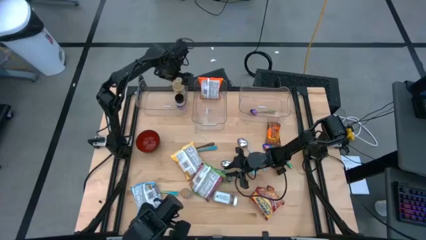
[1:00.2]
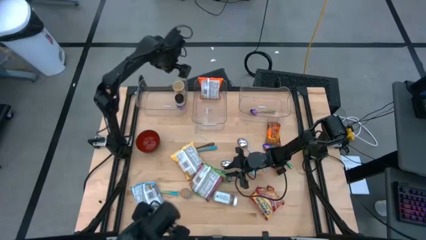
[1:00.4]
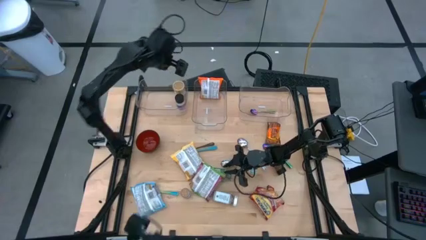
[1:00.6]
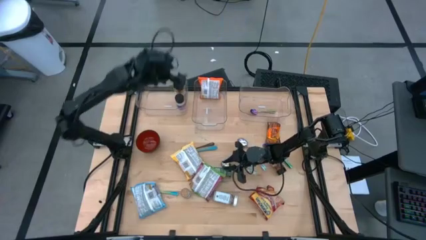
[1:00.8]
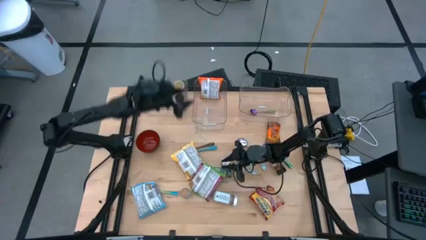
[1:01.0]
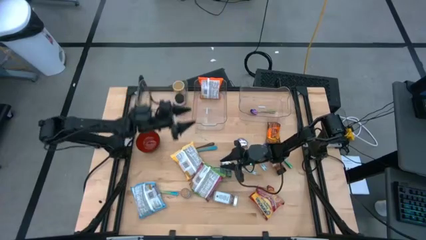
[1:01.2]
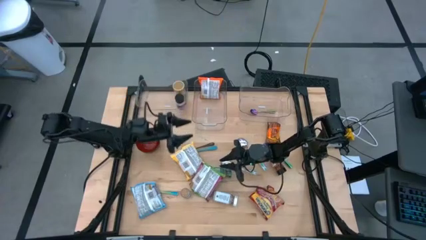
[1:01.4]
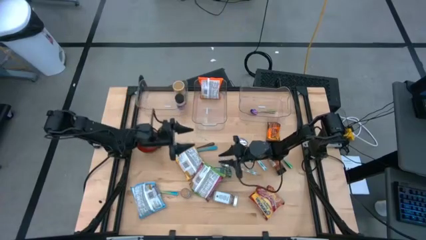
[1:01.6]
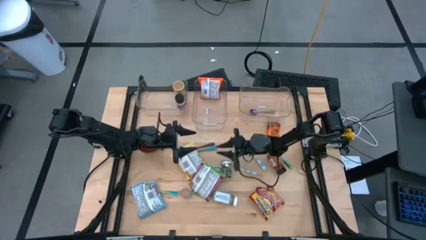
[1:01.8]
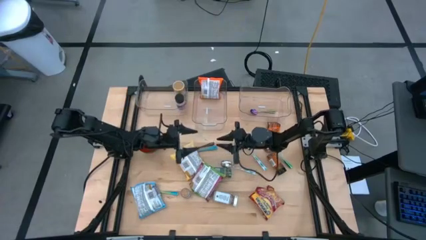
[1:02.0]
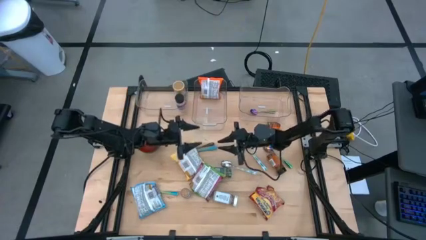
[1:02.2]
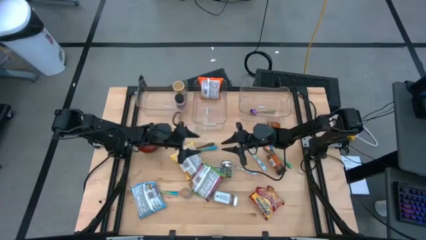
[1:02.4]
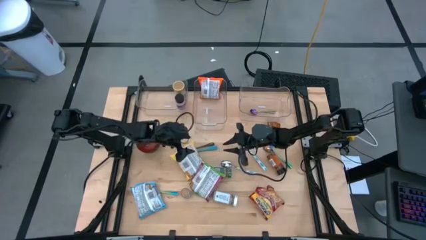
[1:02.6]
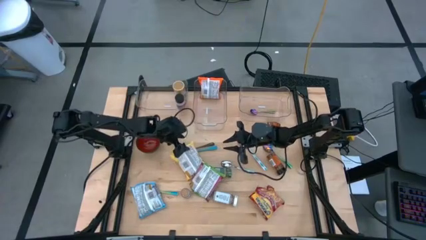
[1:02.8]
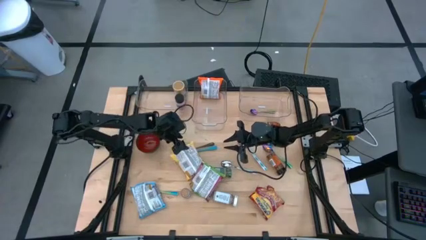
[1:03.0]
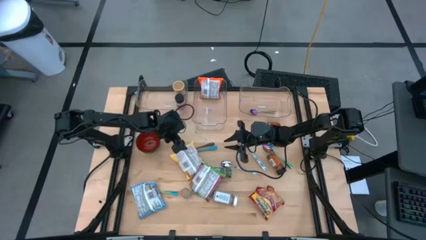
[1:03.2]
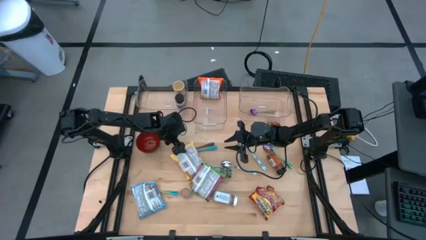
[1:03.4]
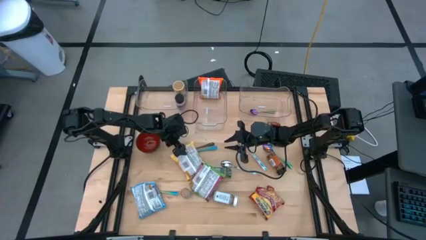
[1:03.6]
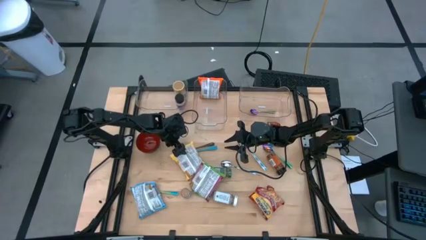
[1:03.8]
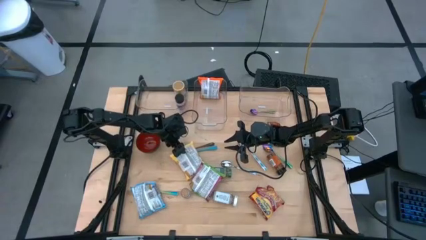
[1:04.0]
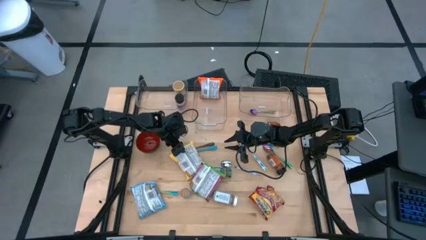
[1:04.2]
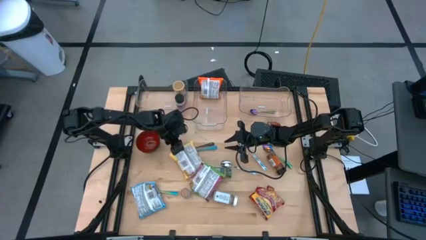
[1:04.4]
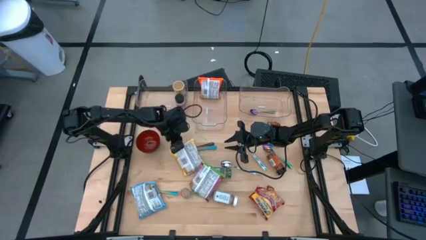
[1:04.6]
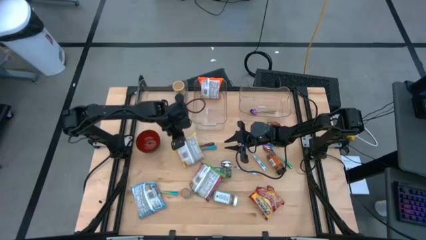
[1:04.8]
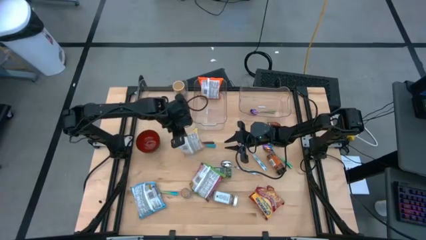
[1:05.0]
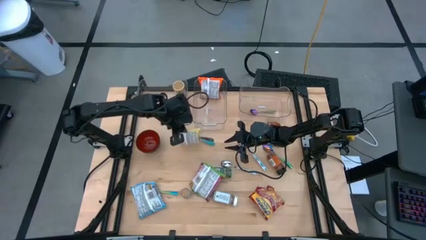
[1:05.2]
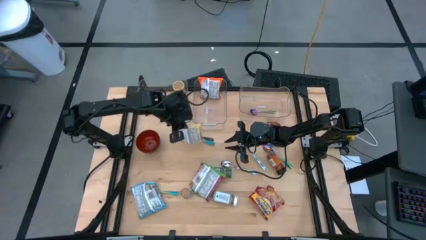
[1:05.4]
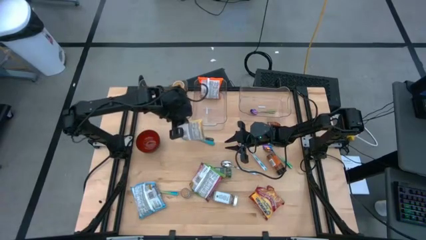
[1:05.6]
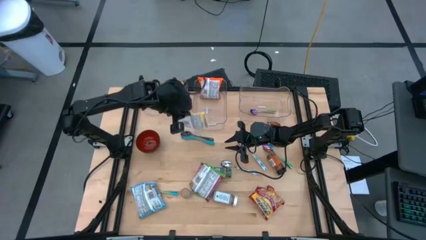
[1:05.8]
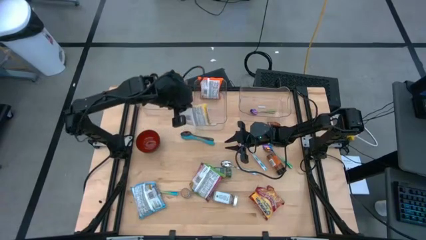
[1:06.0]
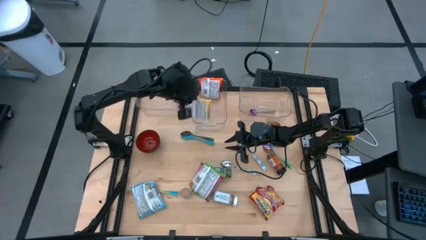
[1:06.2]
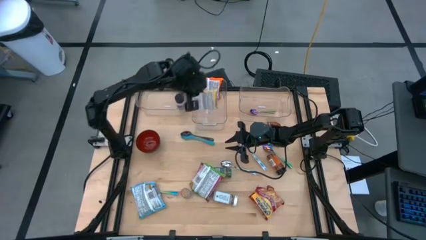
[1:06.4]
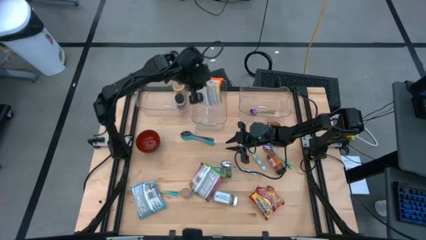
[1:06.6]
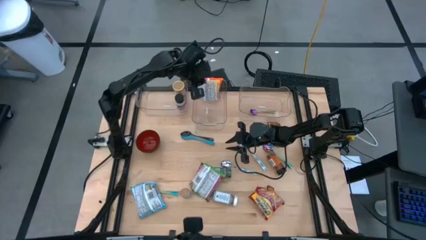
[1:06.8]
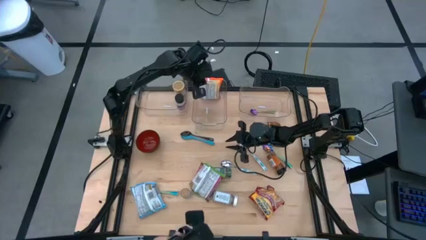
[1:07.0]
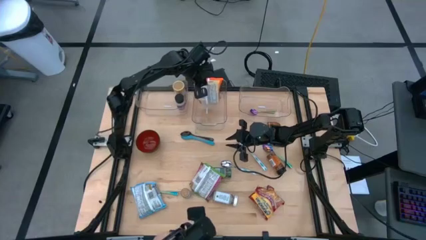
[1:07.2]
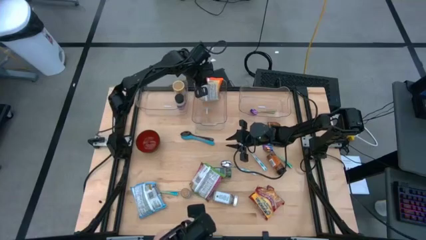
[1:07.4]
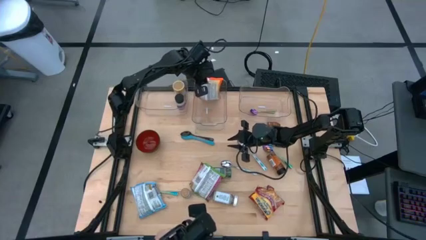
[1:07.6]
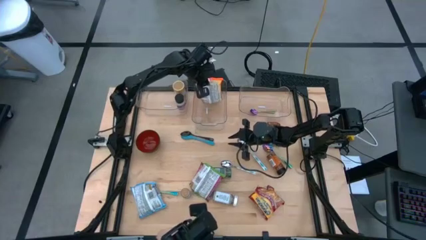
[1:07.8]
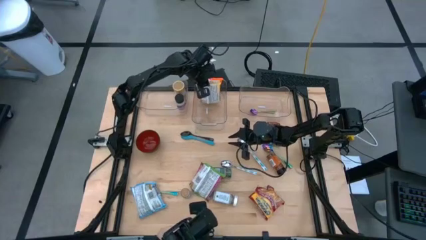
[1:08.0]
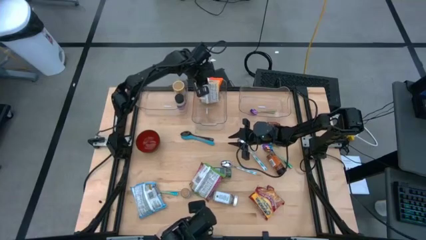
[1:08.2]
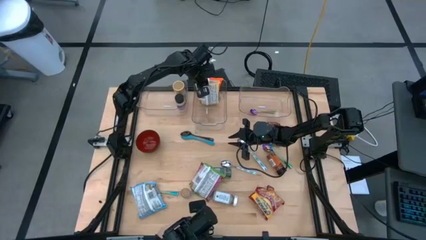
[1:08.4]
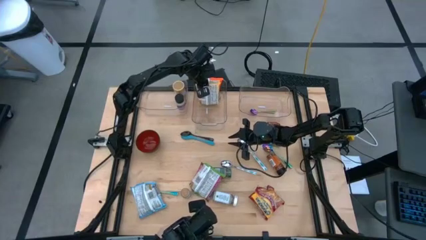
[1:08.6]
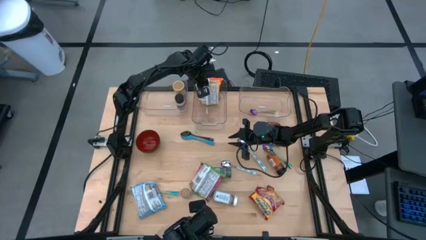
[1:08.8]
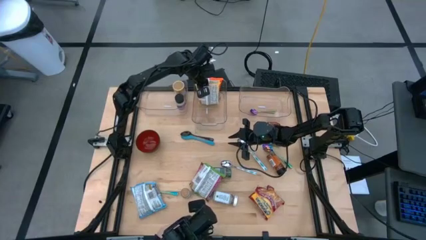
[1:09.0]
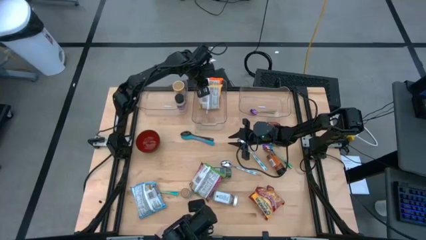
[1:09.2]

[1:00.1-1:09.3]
Task: Pick & Place Food Item
Put the yellow noodle pack into the middle transparent bin

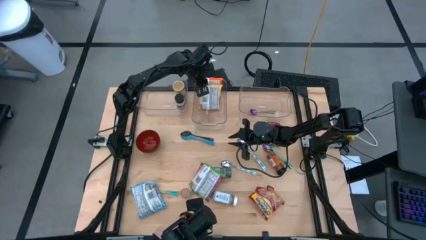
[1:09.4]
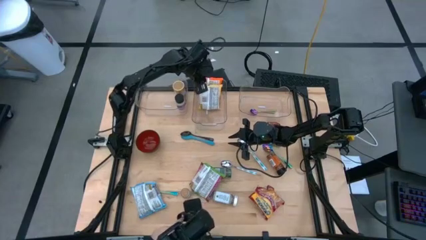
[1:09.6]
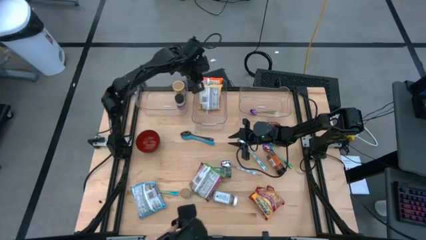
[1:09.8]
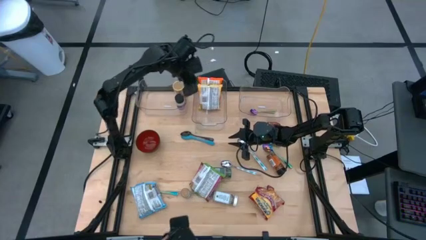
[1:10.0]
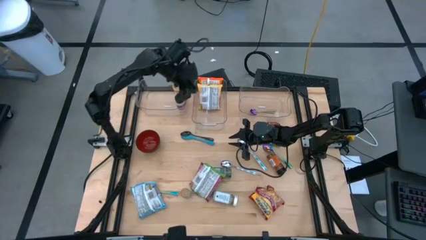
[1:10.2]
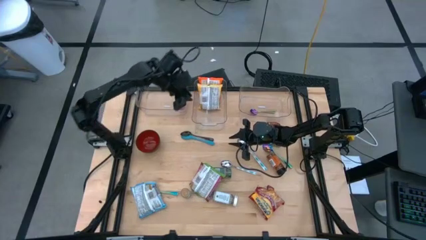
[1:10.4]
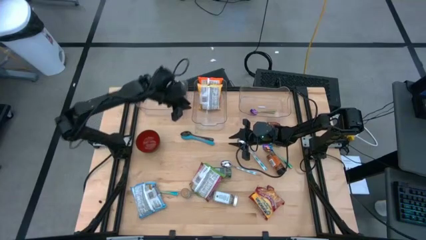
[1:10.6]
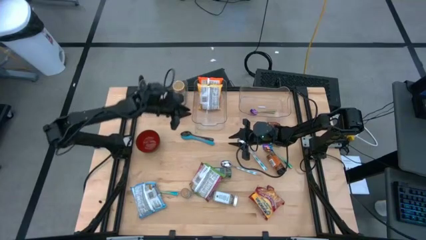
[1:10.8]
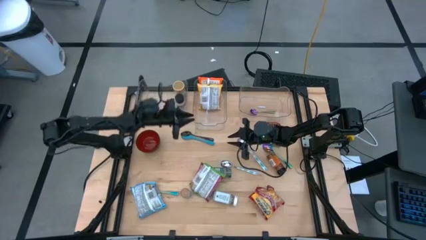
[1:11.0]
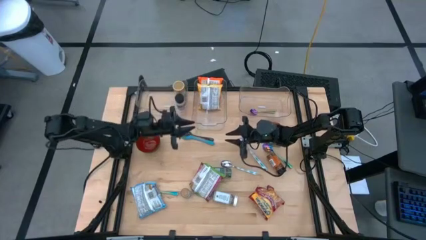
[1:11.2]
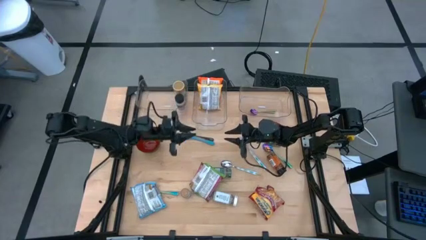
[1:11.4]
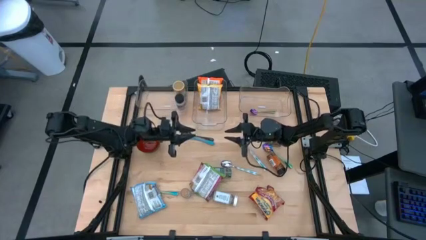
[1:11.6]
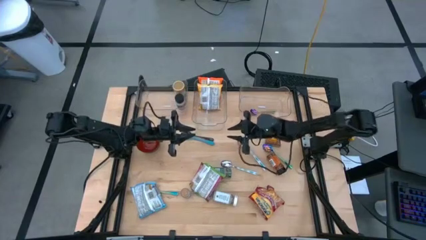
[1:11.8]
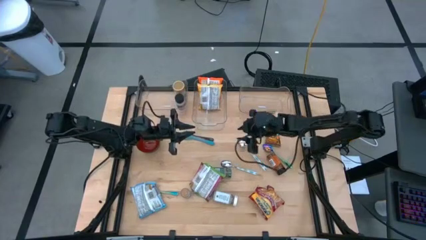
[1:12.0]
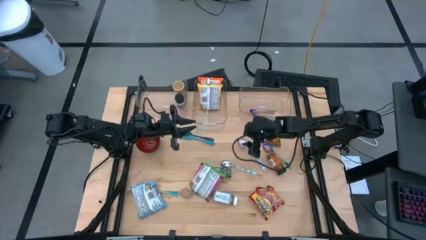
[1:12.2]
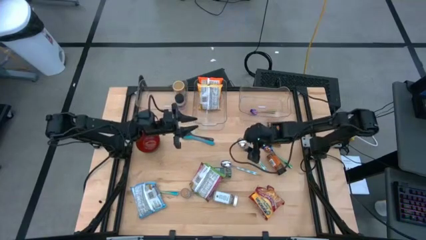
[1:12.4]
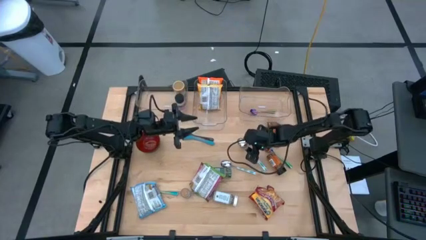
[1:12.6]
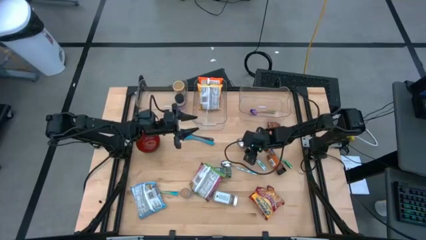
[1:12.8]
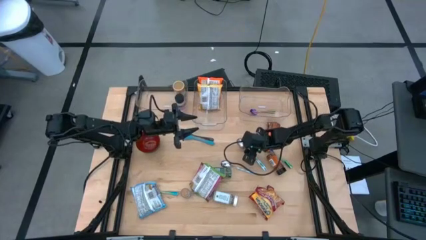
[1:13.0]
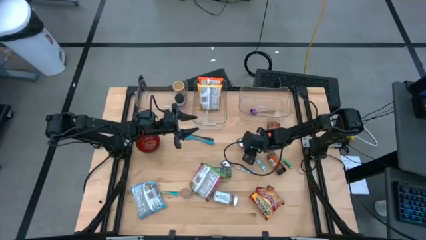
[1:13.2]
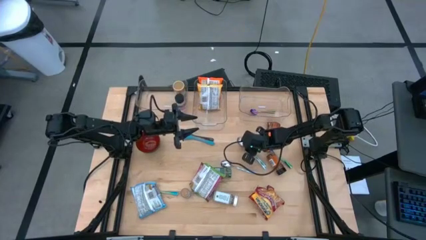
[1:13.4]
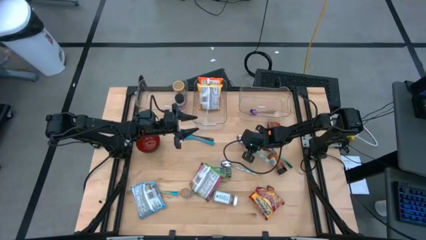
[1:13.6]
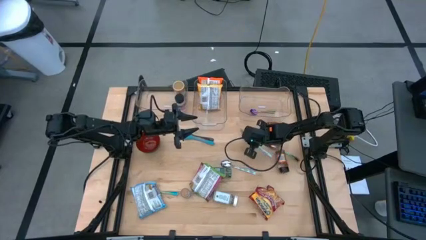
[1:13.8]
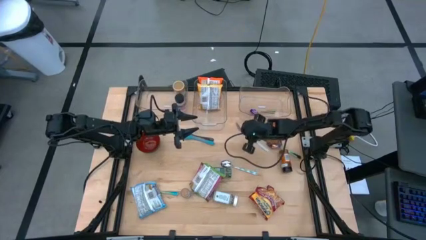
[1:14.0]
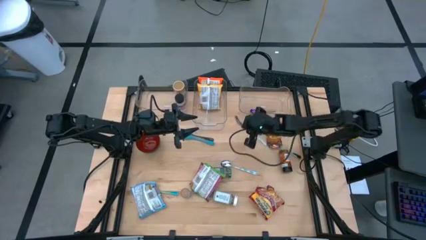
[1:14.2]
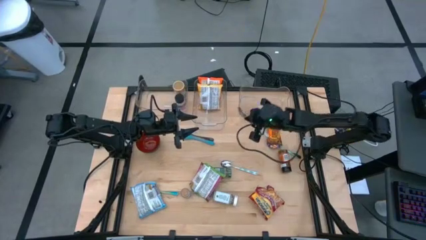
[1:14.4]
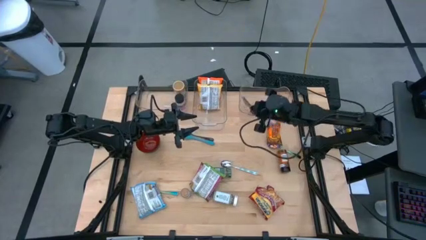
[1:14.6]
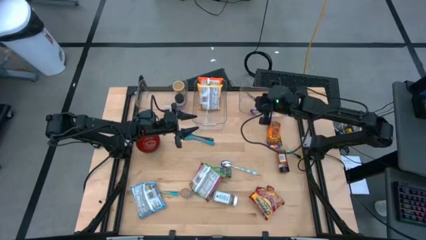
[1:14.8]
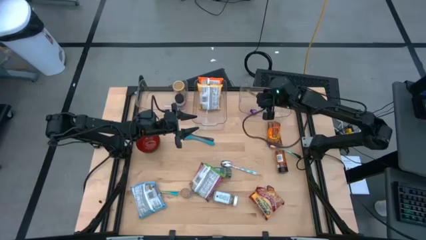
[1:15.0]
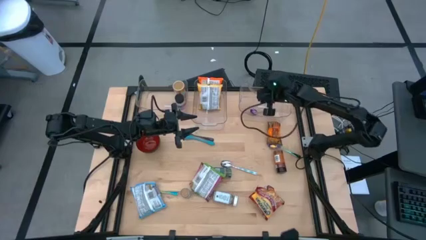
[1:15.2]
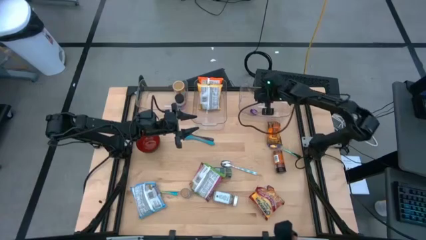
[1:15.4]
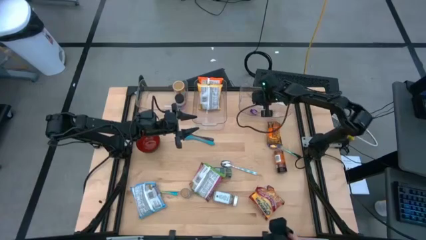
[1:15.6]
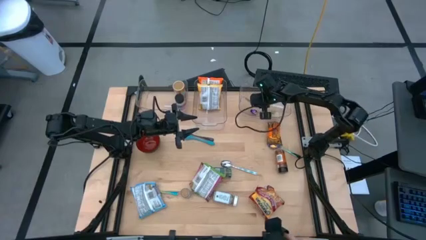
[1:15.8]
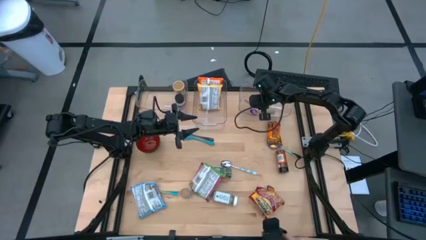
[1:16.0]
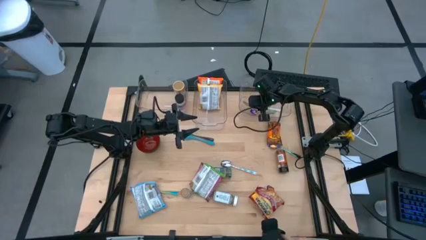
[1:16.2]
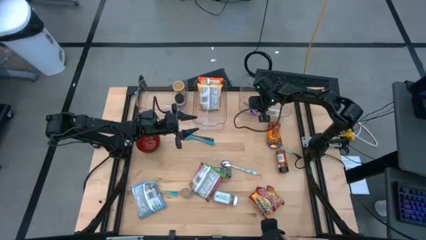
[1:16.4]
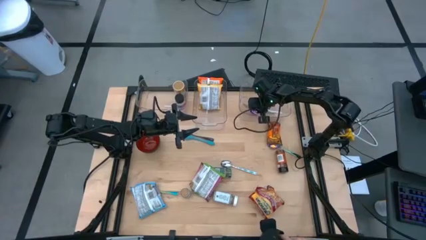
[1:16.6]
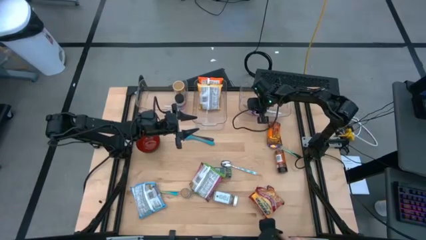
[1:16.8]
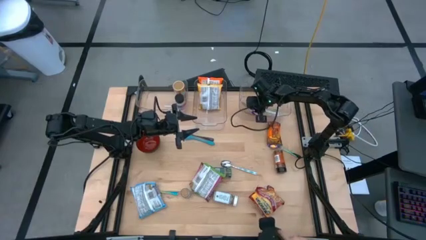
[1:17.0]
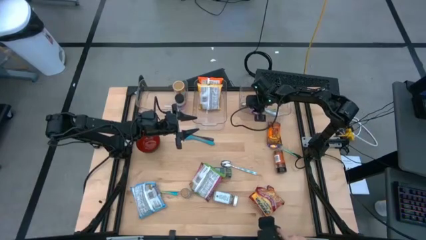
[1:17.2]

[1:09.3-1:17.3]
Put the top blue patterned spoon into the right transparent bin

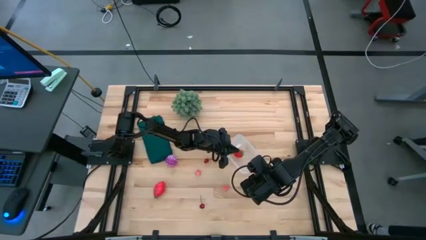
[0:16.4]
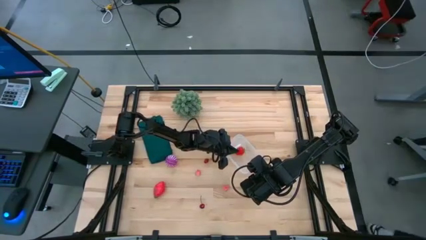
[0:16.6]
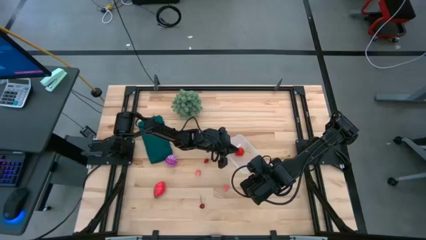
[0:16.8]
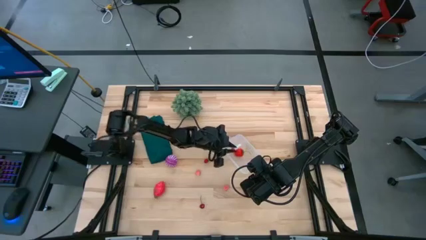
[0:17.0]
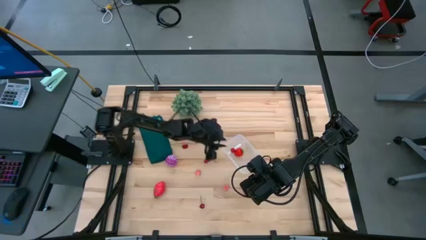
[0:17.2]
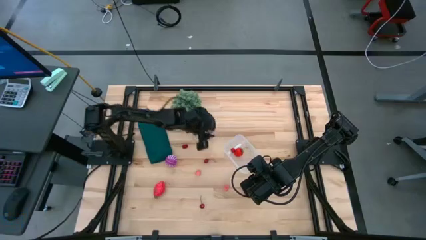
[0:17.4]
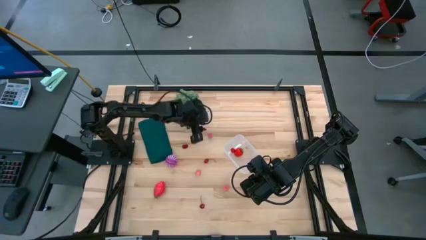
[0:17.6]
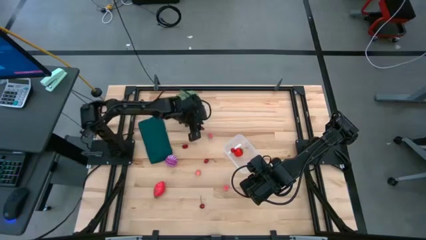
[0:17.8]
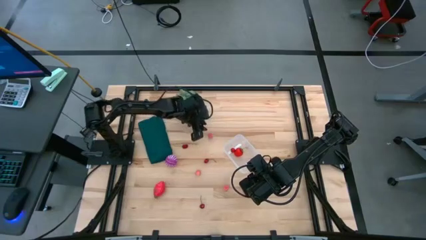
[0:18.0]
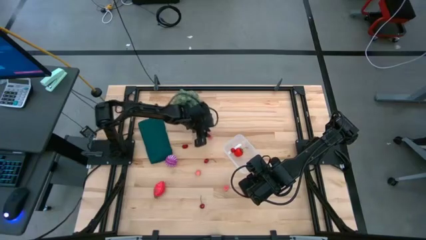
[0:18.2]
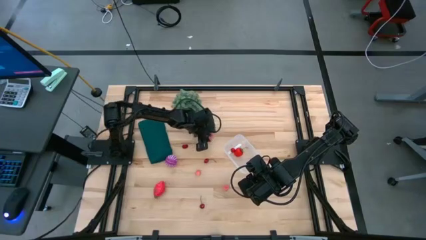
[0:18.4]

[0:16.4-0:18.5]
Task: Pick and placing Produce into tupperware
Put the top peach into the container
